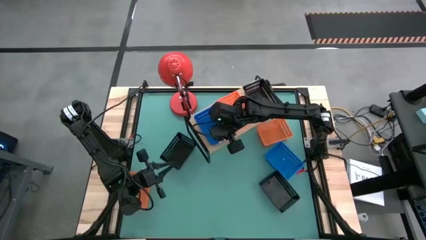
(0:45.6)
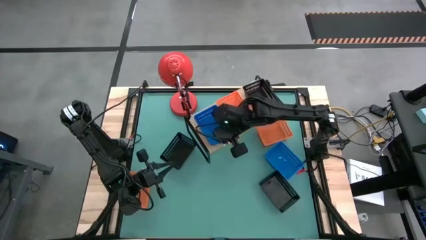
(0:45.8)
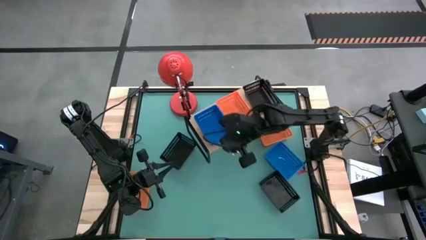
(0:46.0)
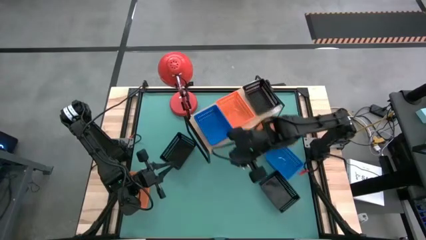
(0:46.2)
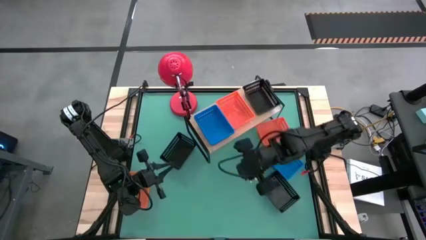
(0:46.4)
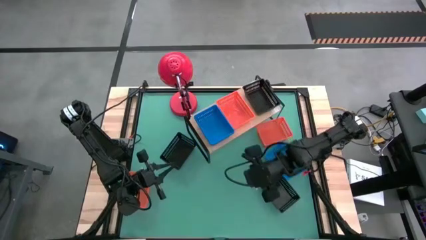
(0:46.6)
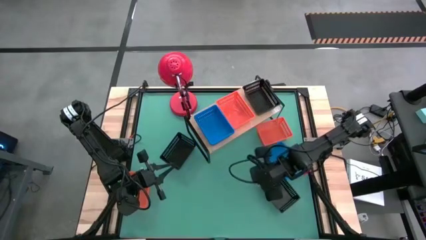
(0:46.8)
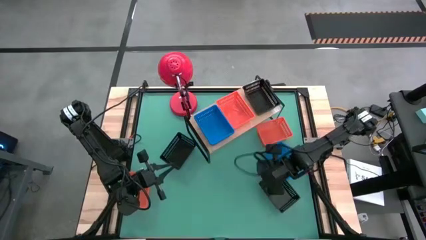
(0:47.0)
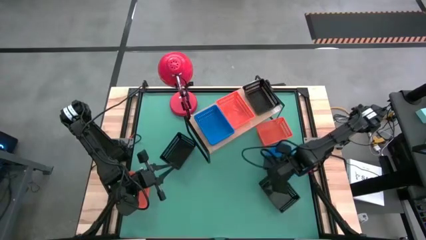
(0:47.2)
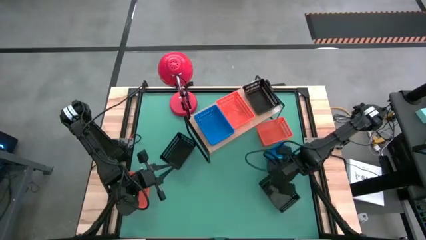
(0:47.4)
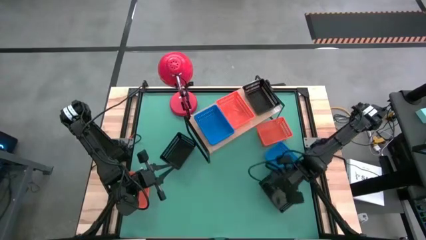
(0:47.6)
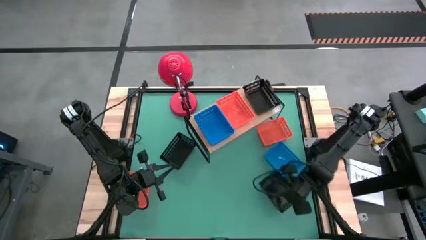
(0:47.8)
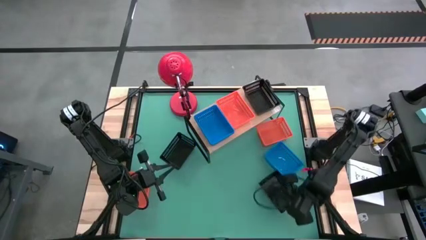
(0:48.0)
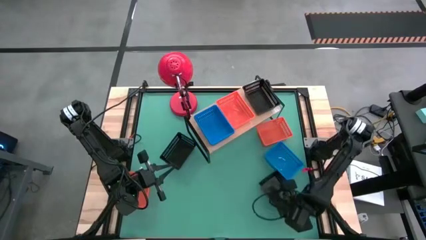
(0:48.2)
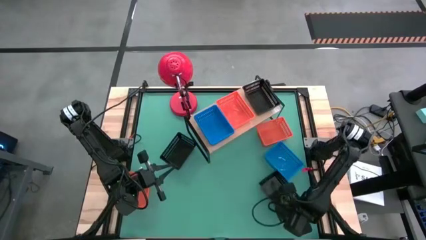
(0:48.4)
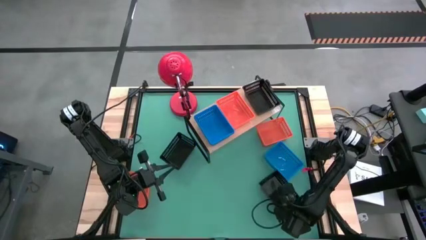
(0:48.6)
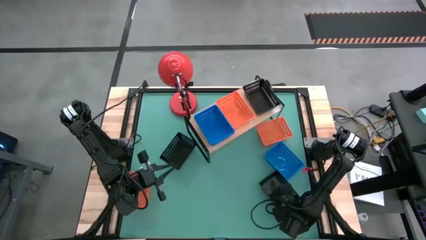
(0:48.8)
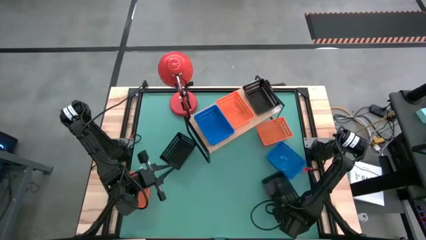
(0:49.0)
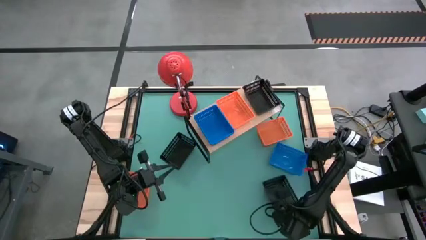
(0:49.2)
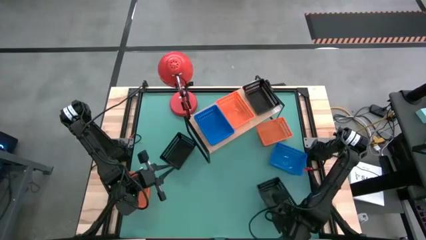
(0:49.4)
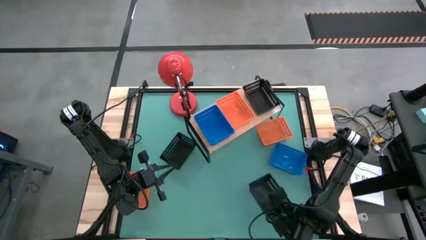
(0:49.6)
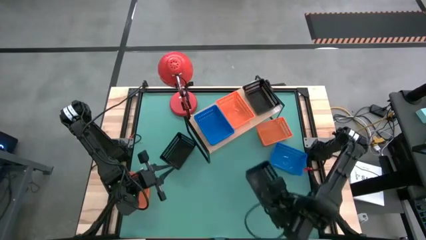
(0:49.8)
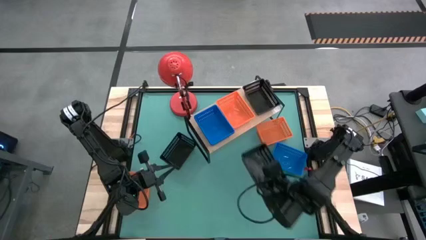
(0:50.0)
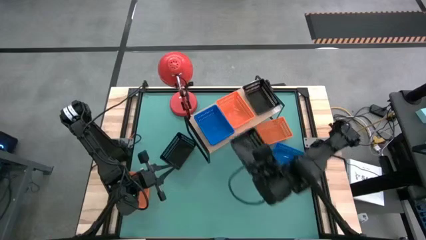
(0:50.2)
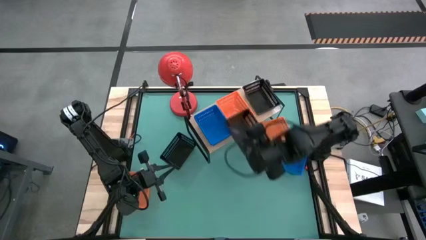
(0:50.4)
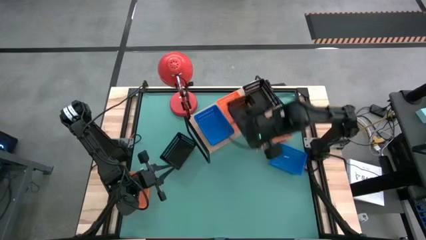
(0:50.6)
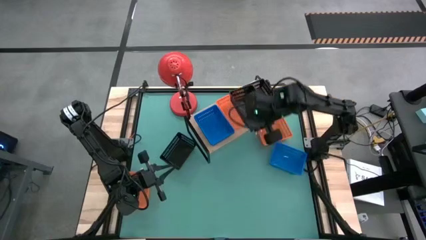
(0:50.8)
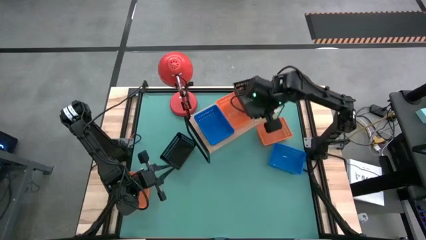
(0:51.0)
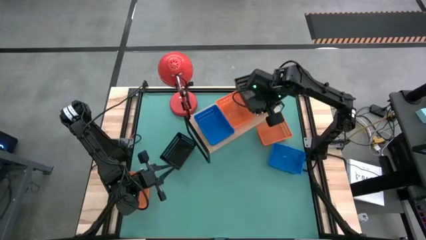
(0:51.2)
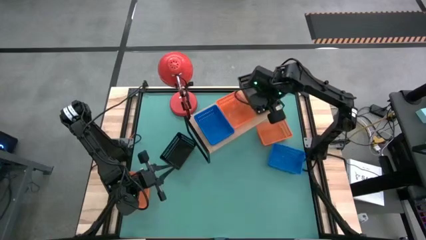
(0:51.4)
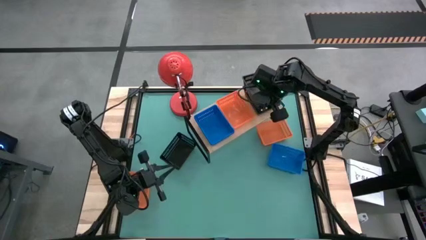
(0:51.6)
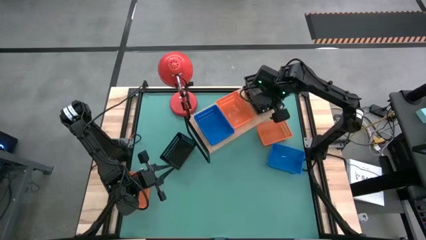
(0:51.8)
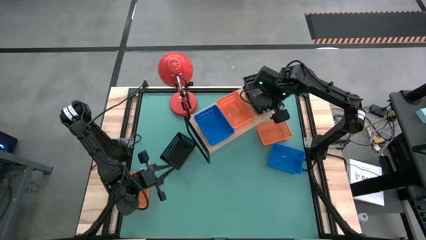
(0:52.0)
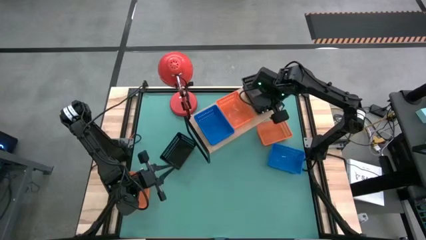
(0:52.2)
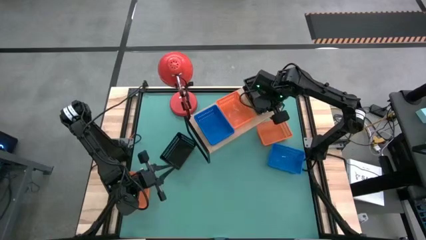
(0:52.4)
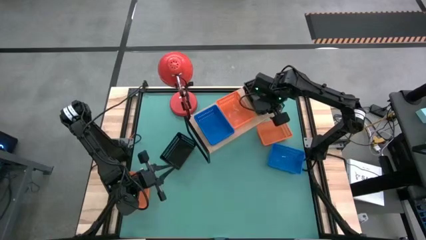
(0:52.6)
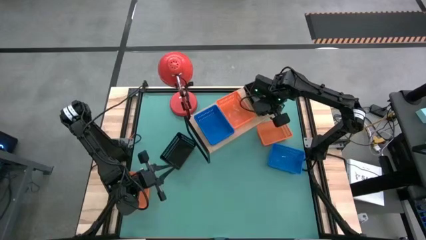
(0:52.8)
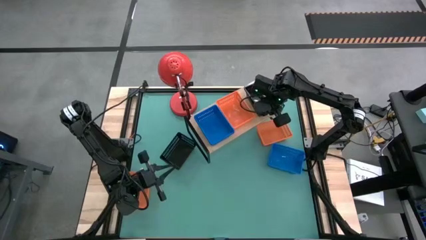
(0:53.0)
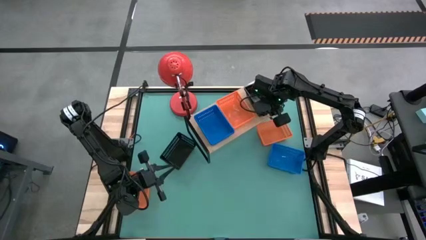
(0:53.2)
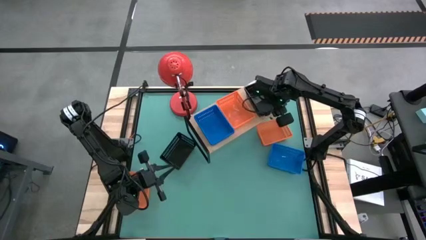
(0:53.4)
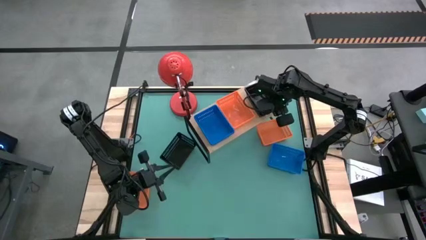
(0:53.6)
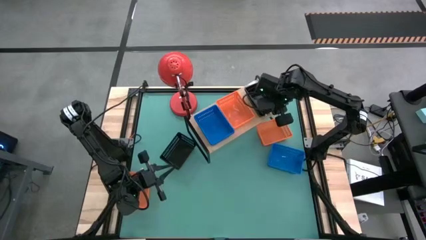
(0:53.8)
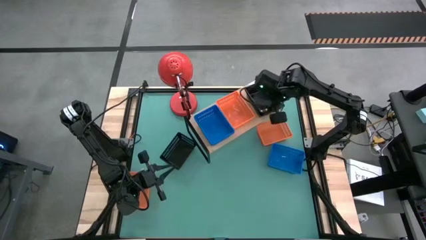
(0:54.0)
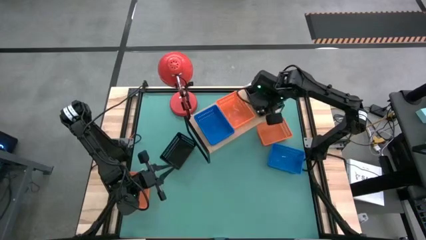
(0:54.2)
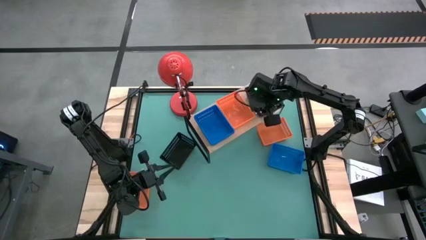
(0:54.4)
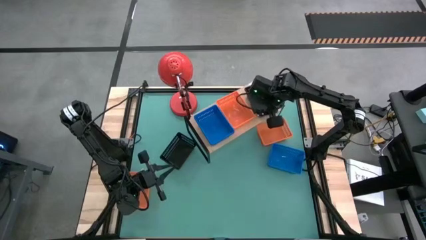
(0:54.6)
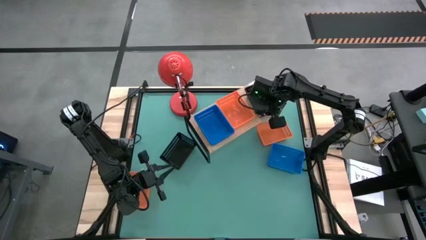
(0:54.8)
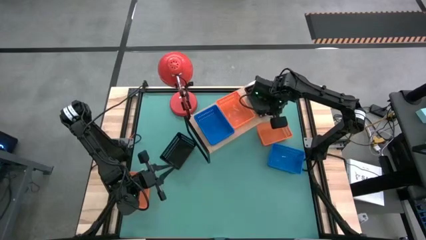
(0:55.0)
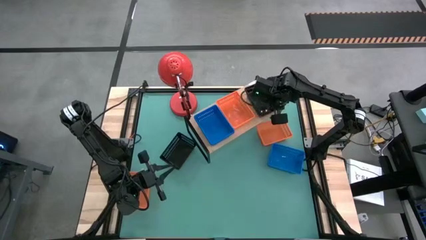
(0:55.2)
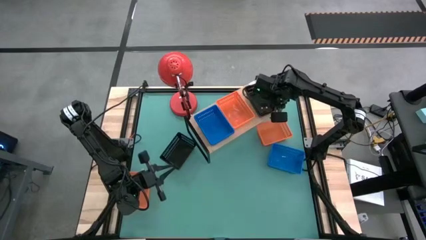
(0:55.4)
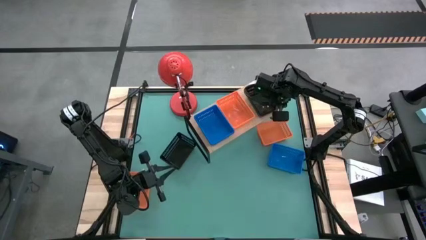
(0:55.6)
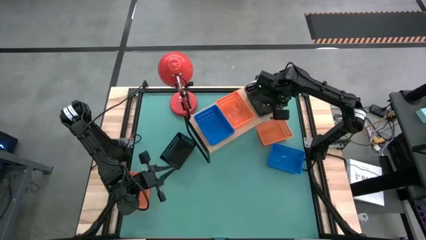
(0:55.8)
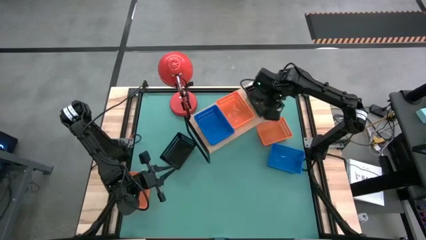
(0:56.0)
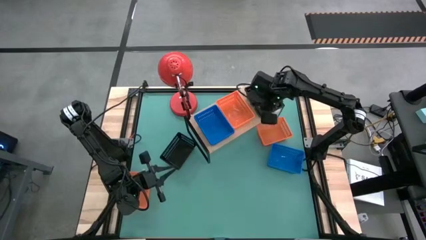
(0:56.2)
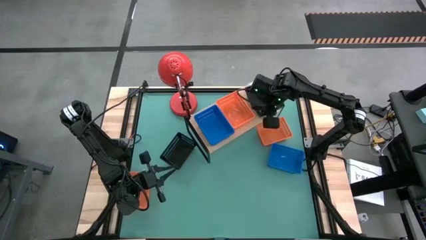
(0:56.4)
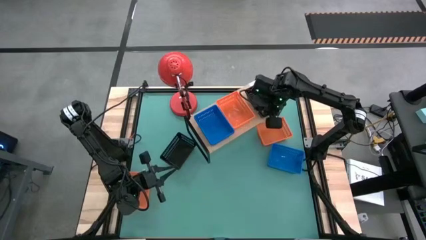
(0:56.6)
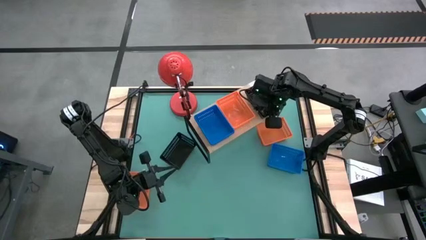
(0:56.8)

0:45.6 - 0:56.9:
Task: Stack baskets on shelf by color
Stack the right black basket on top of the black basket on the shelf

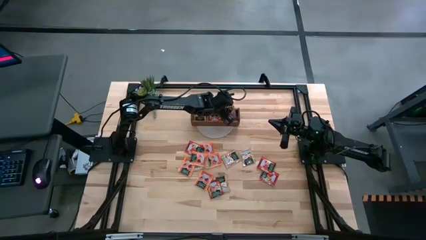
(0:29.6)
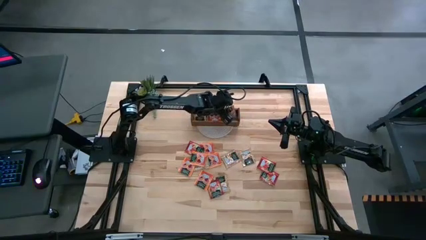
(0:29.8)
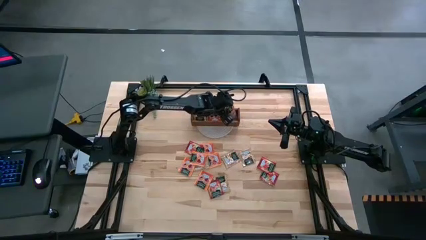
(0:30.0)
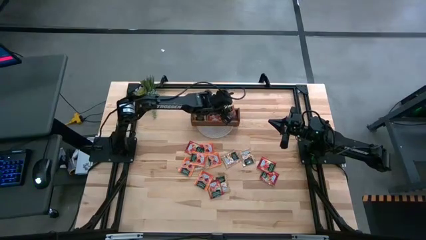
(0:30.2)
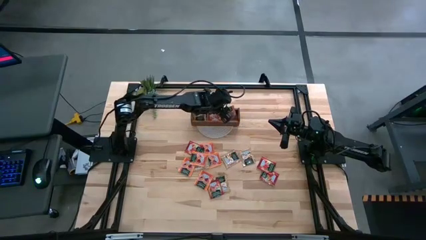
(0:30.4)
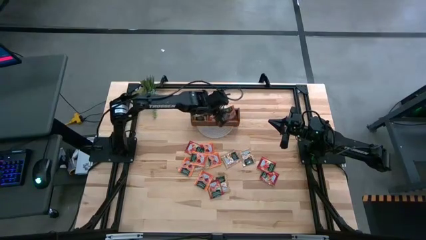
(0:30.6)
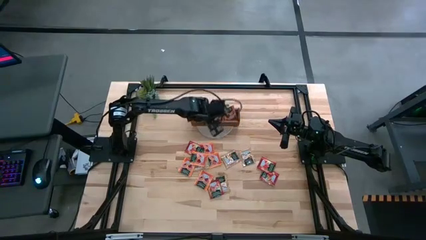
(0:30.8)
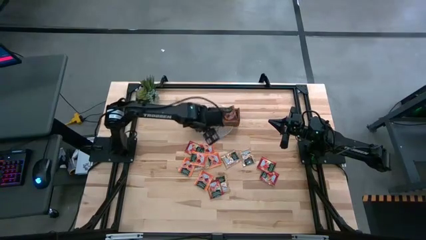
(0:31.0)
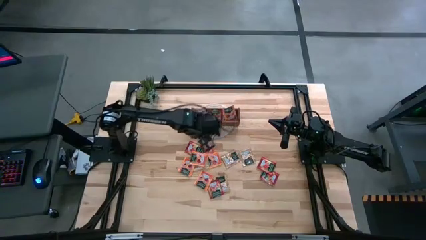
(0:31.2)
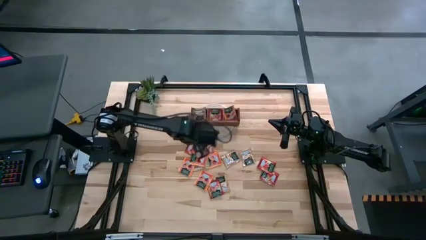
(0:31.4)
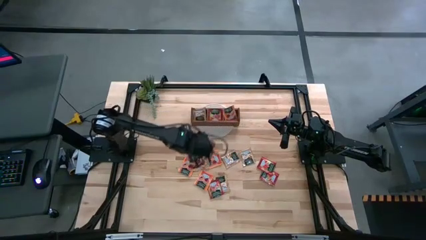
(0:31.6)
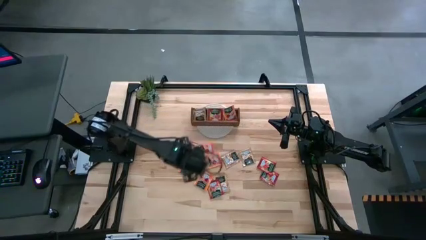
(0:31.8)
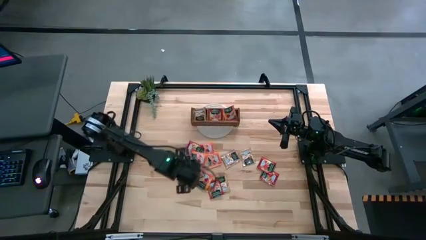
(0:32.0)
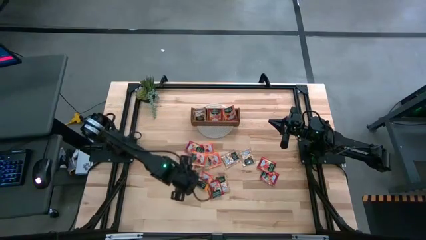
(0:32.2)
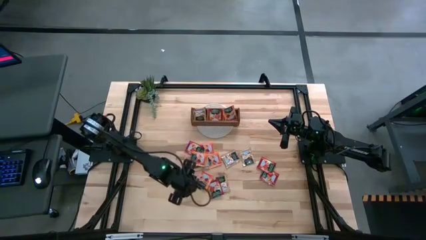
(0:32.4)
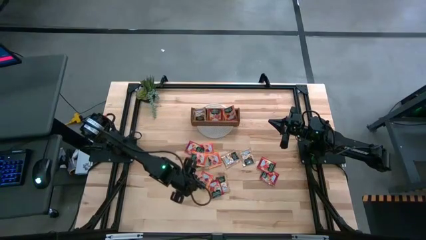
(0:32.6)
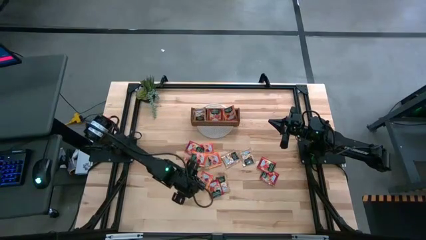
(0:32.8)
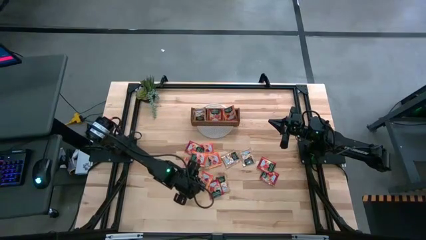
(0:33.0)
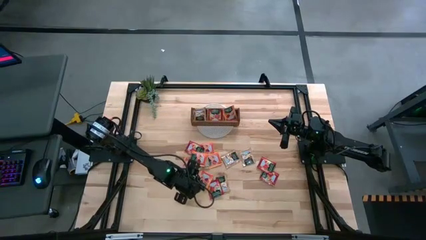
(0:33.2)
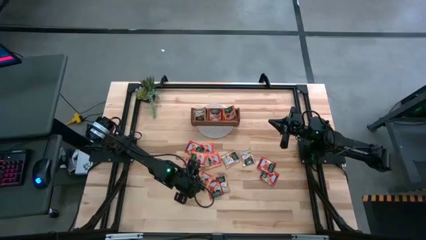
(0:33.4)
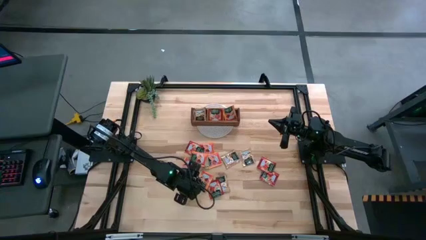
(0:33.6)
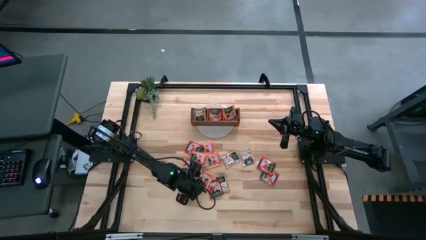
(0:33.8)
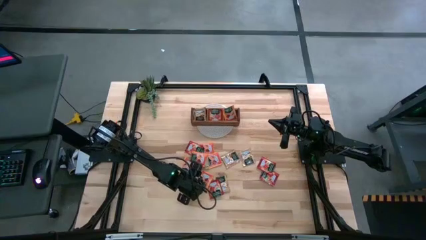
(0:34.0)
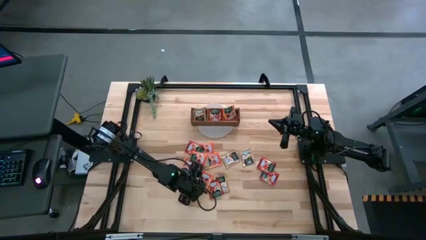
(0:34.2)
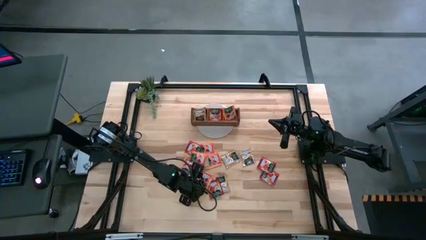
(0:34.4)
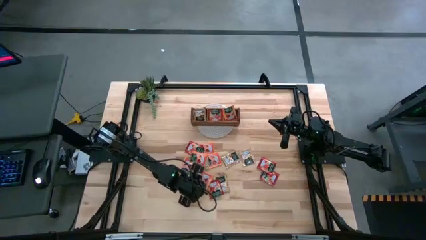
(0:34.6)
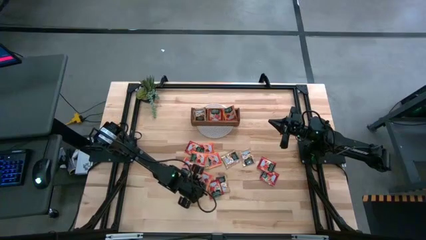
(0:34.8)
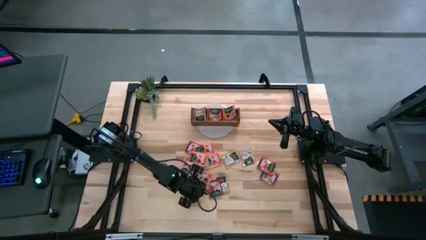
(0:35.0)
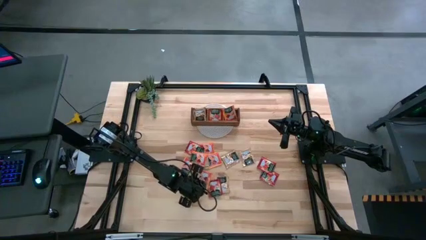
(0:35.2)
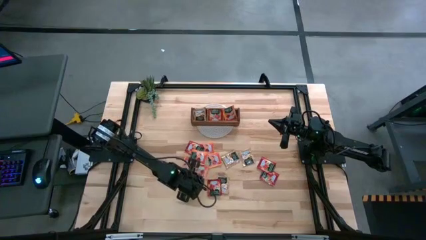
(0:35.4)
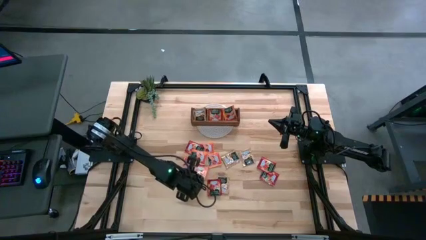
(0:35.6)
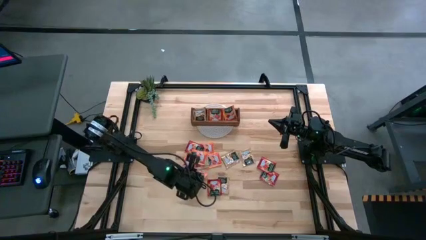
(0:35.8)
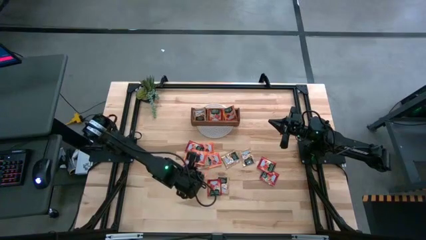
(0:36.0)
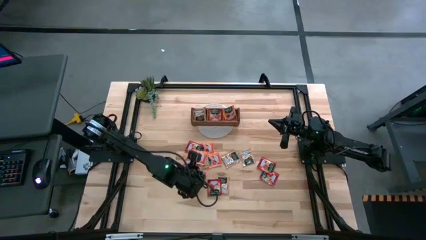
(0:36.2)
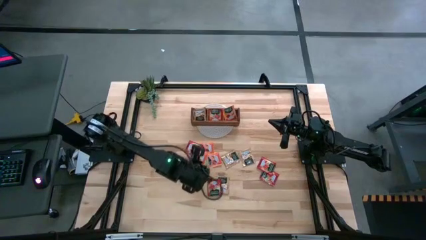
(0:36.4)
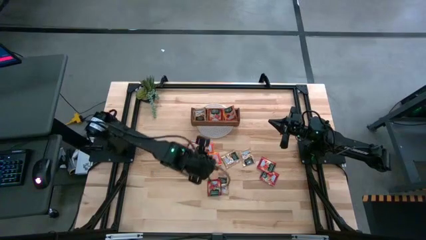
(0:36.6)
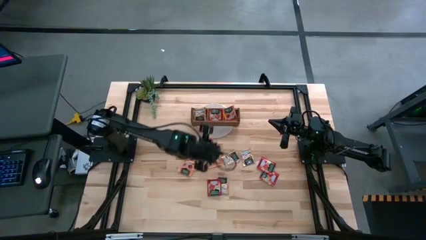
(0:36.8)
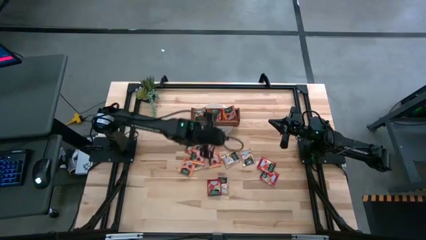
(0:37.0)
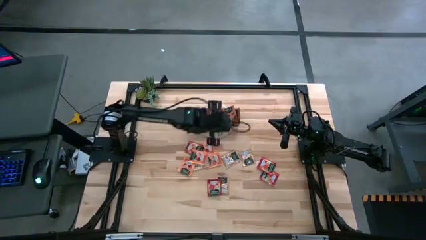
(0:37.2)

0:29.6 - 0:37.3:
Task: Pick & Place Tea
Put the orange tea bag in the right section of the wooden organizer
